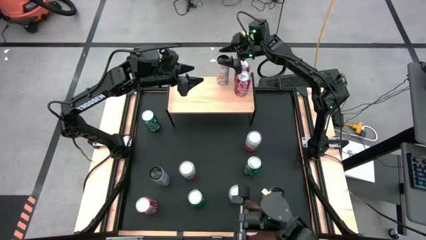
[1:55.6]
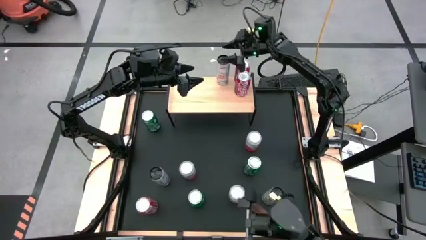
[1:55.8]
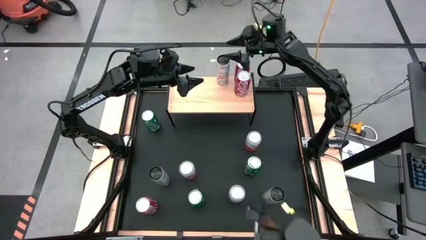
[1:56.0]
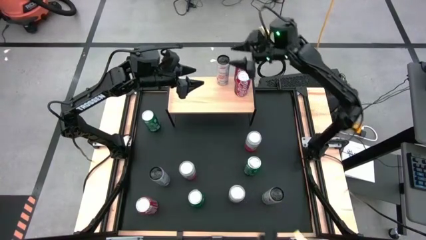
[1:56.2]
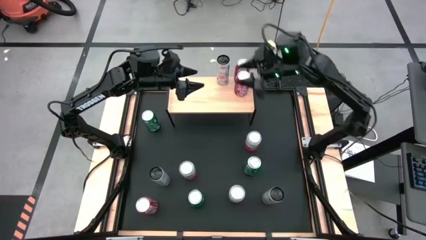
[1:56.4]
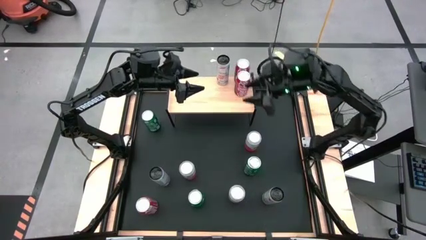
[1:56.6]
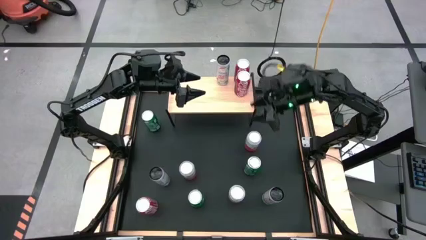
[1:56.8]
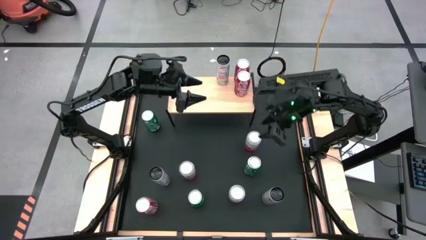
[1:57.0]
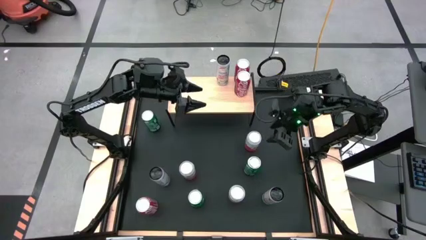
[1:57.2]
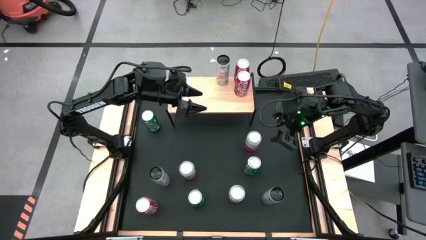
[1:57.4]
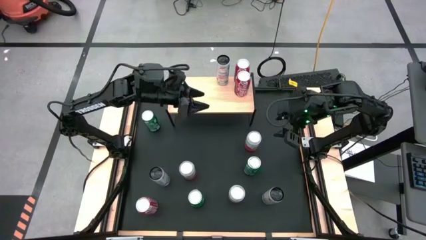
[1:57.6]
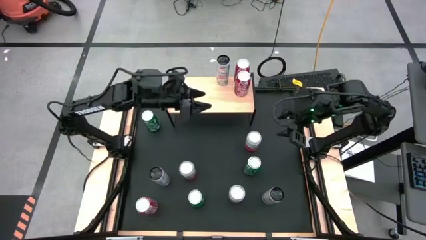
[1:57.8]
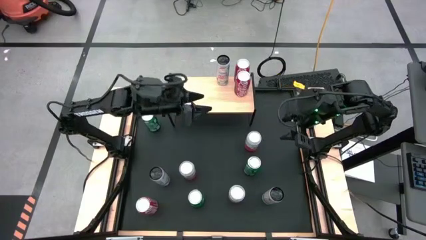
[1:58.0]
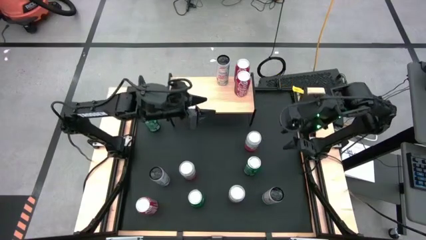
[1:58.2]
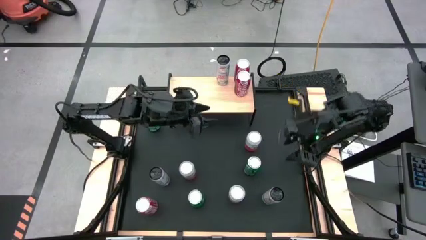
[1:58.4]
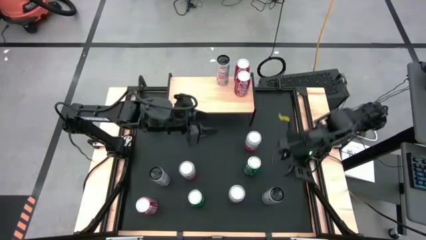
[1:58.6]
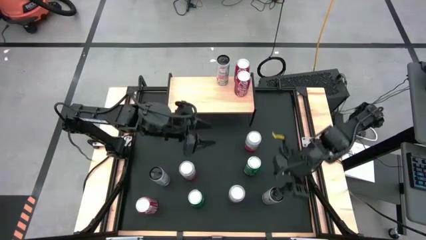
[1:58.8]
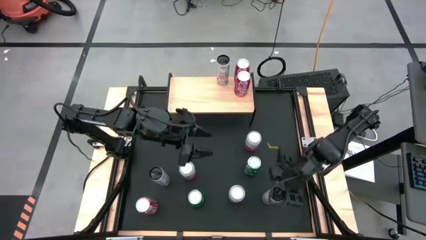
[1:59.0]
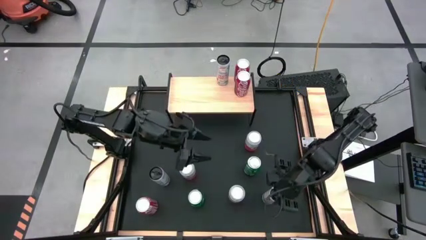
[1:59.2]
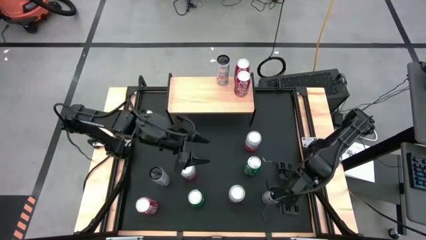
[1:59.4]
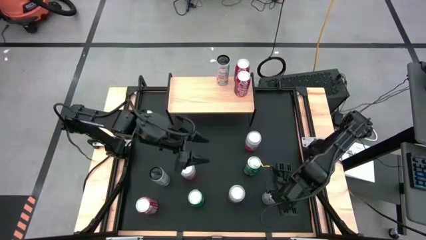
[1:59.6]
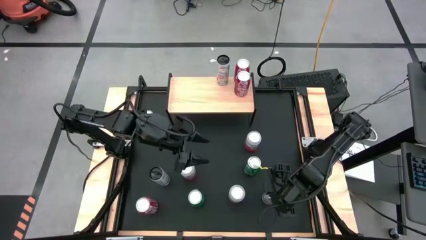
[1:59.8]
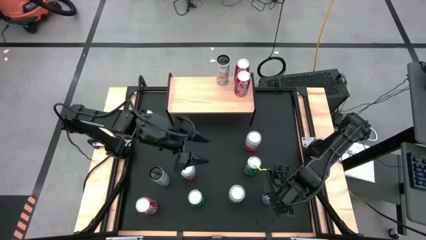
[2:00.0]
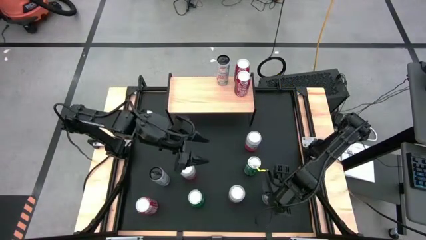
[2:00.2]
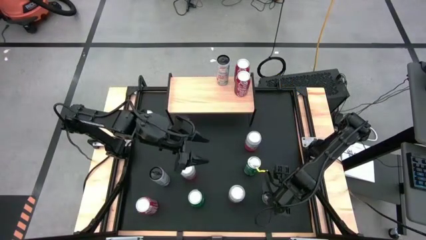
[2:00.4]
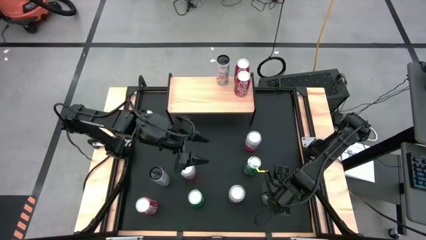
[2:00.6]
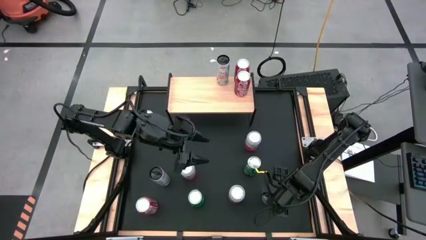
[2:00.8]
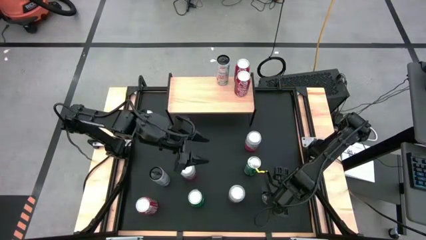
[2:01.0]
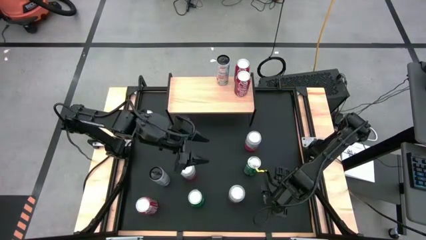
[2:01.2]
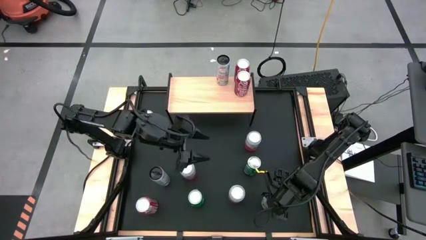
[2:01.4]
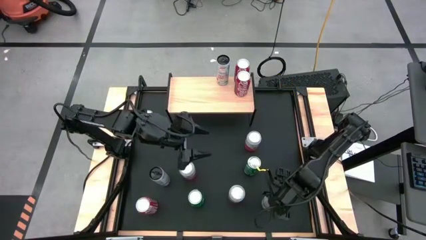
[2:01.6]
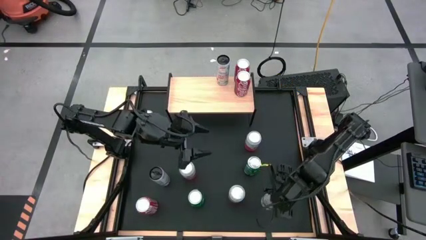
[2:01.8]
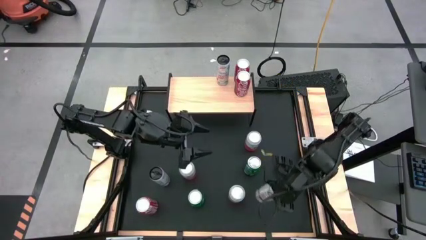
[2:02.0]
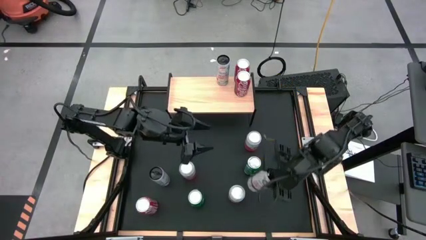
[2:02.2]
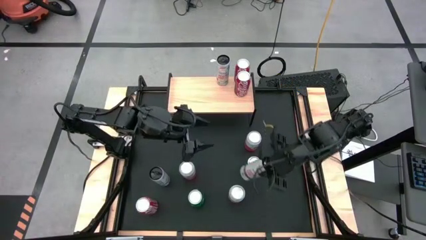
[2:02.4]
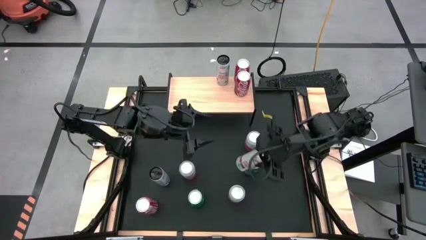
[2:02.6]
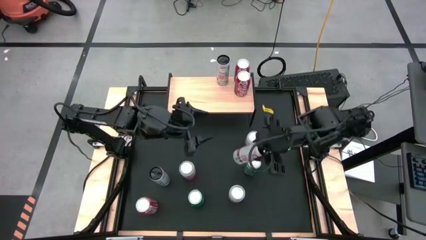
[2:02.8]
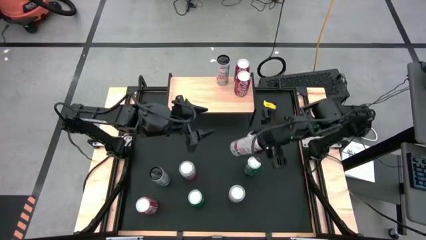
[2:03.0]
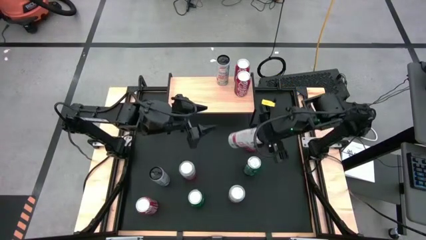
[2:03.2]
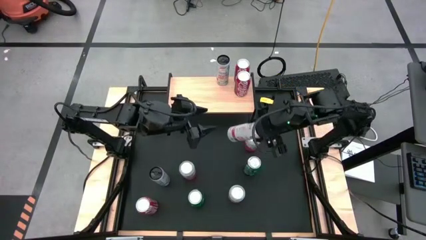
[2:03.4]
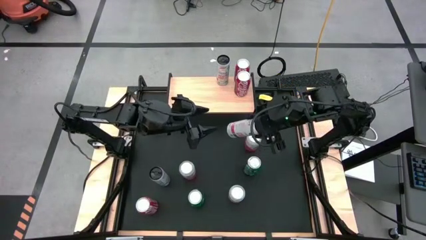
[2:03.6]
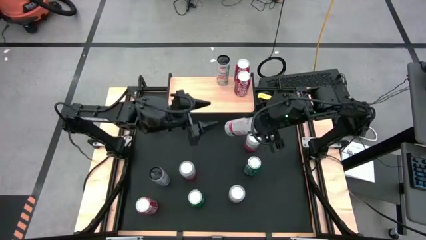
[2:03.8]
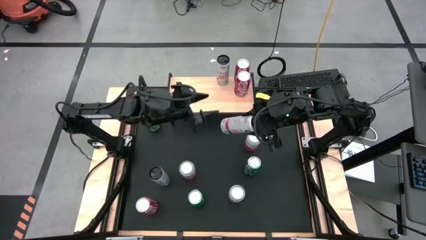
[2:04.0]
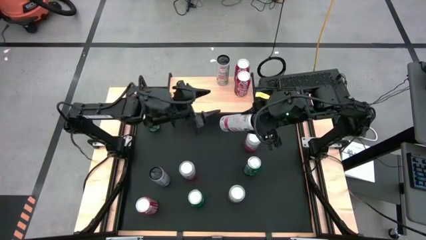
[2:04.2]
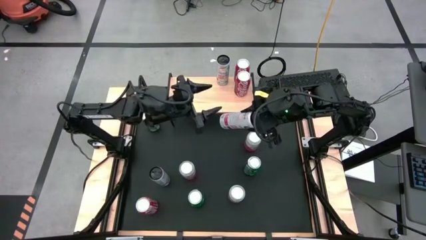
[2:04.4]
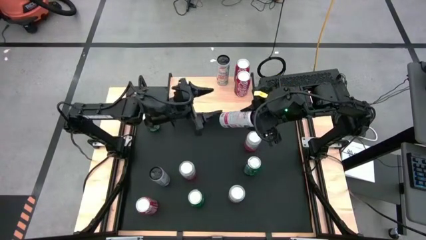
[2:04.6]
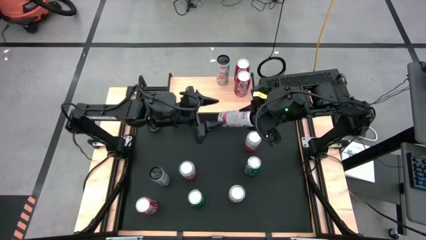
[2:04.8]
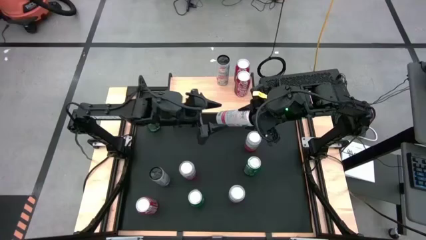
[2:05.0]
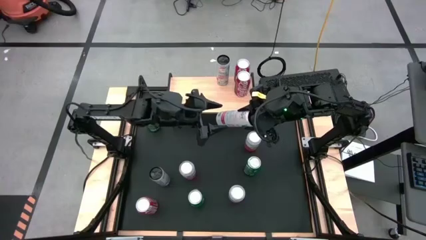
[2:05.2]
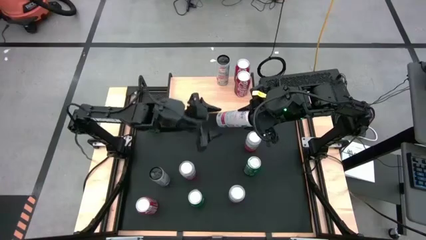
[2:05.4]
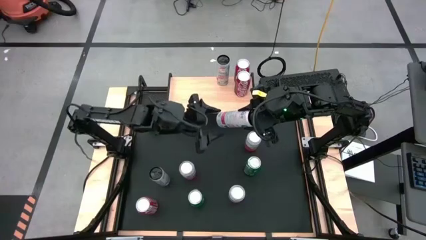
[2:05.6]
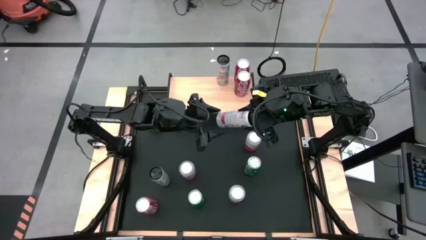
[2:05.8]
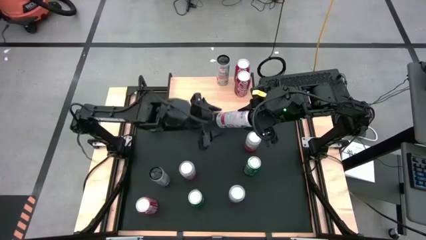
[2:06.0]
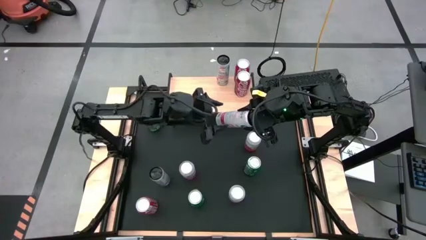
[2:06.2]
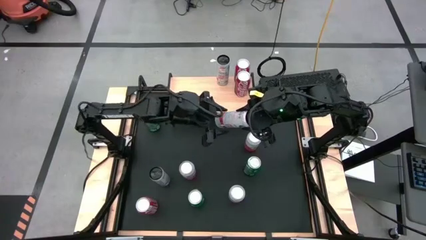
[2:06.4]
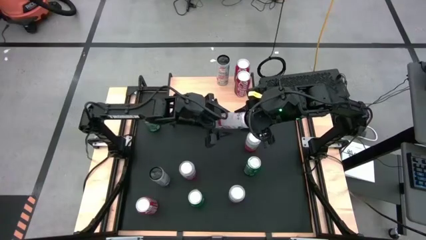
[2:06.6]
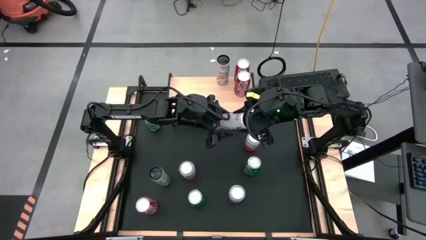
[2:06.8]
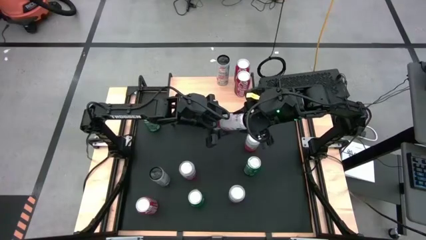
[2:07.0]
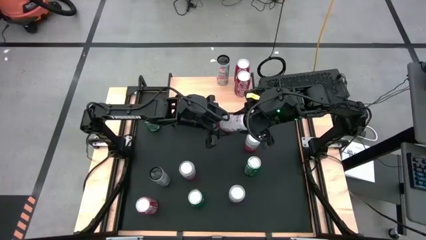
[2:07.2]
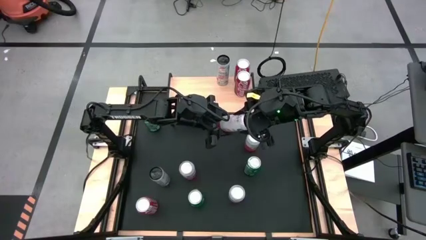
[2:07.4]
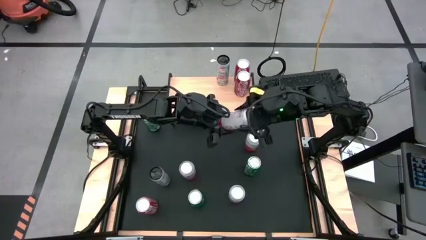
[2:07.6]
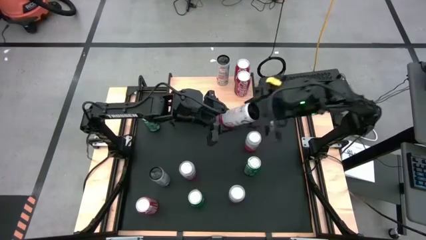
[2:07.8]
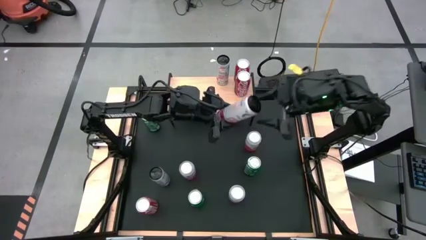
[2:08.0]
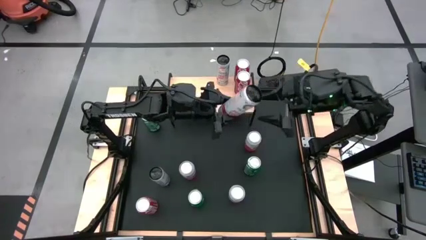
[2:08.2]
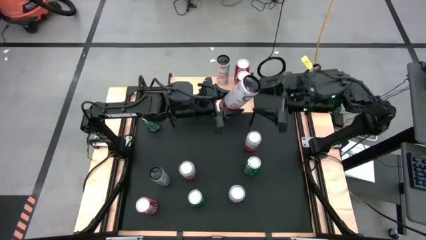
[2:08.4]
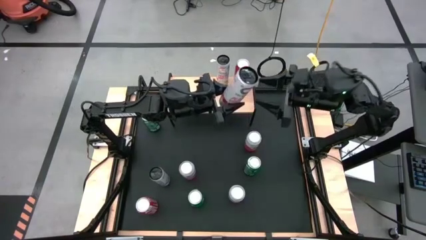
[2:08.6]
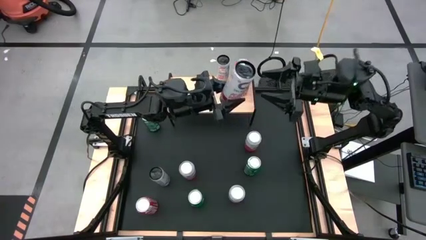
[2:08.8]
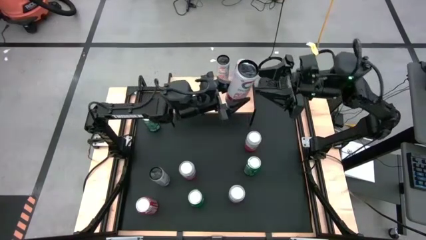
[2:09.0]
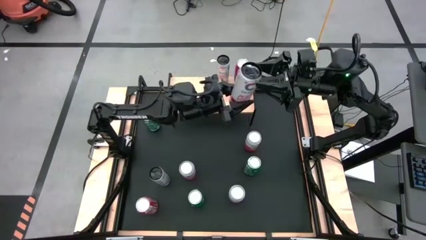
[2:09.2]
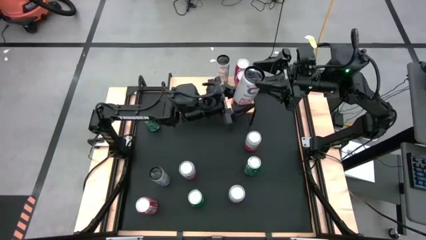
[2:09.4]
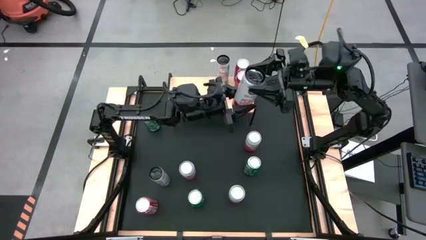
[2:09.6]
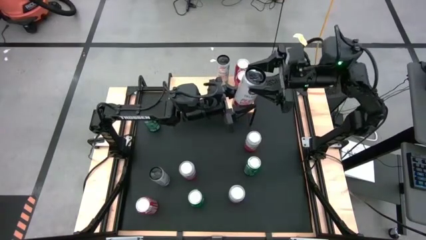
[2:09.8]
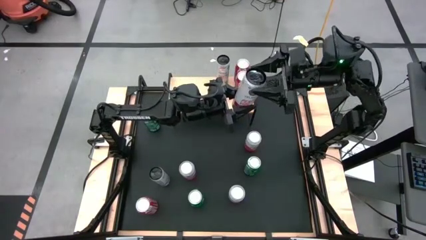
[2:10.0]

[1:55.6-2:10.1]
Task: Place canned beverage on shelf
Put the bottom white pink soda can aligned with the other white pink soda can on the shelf
